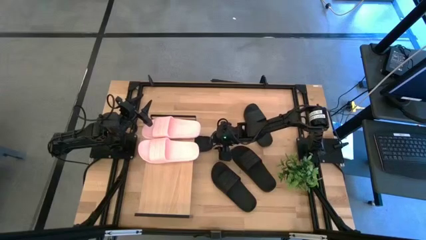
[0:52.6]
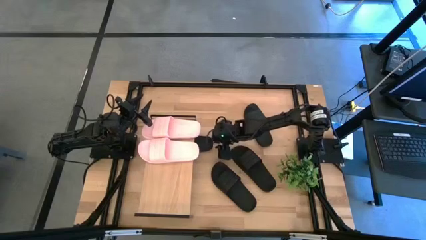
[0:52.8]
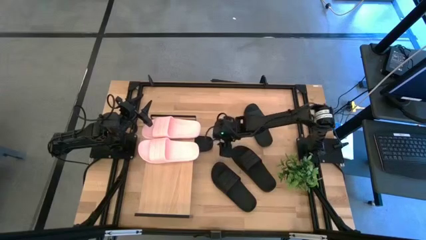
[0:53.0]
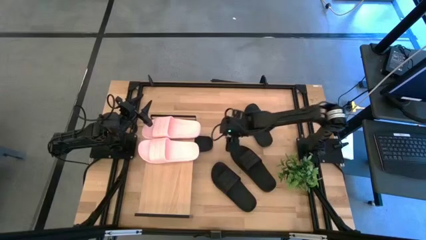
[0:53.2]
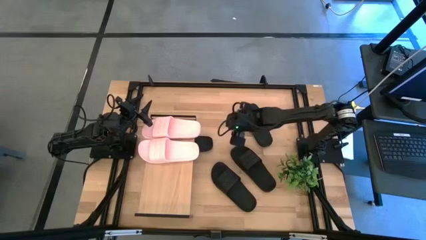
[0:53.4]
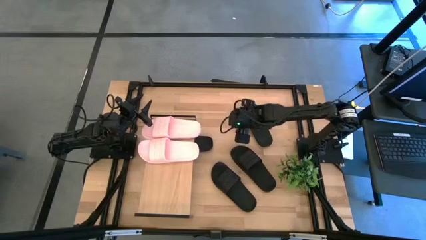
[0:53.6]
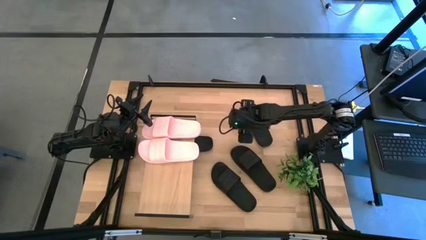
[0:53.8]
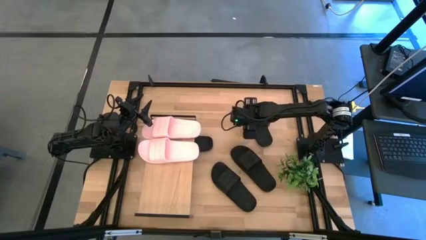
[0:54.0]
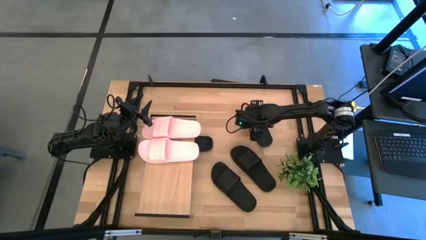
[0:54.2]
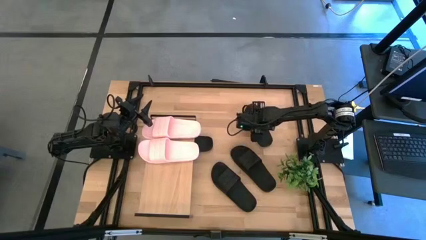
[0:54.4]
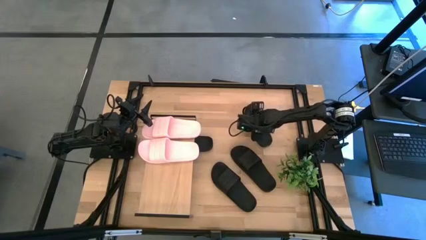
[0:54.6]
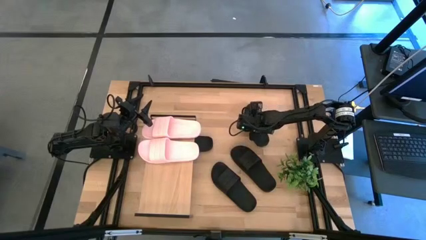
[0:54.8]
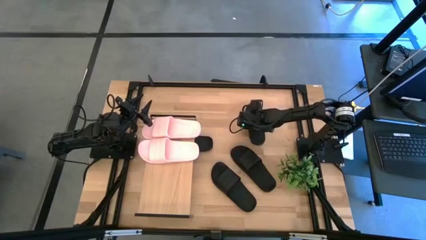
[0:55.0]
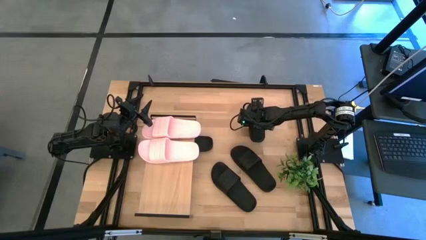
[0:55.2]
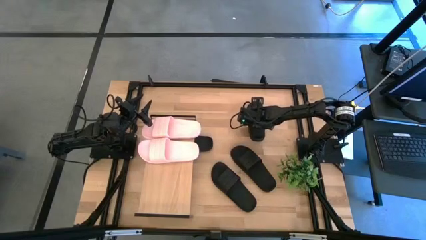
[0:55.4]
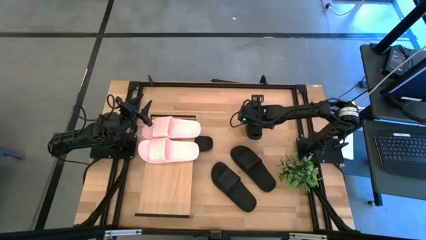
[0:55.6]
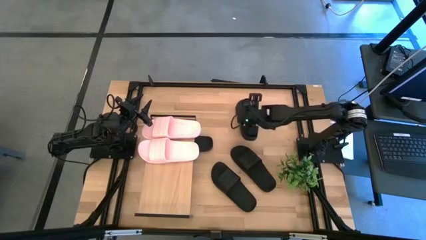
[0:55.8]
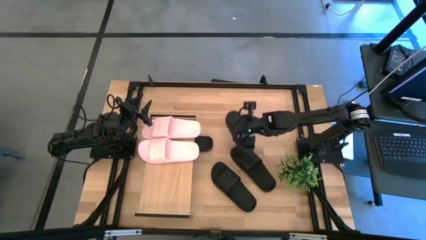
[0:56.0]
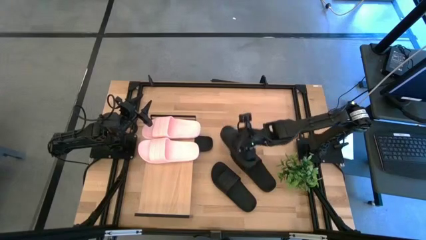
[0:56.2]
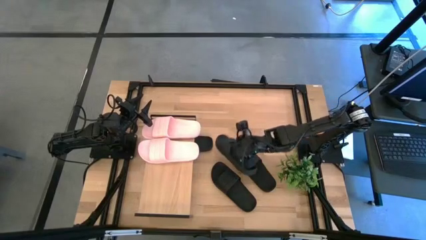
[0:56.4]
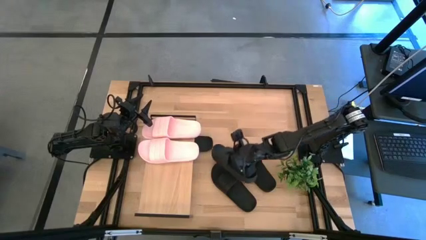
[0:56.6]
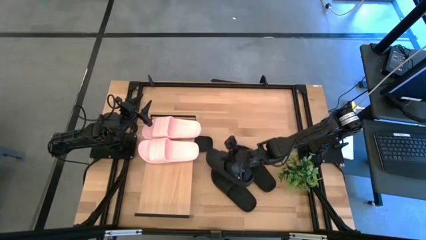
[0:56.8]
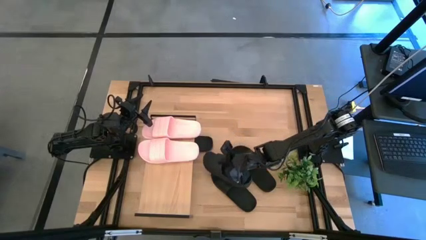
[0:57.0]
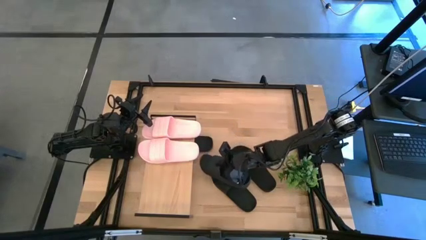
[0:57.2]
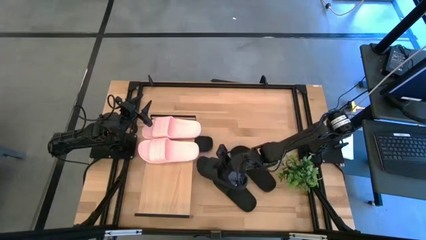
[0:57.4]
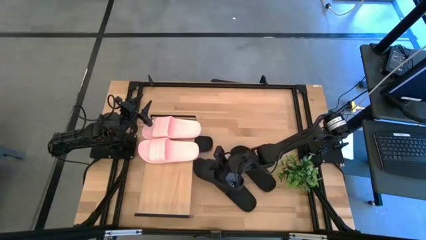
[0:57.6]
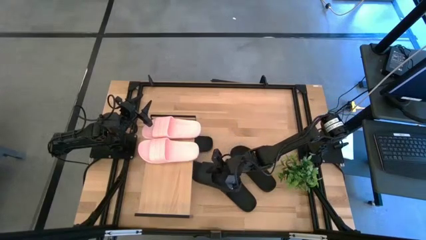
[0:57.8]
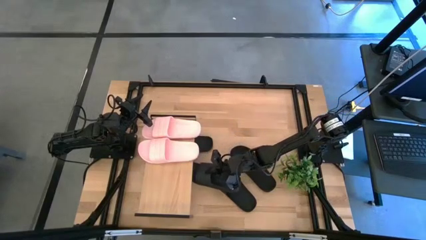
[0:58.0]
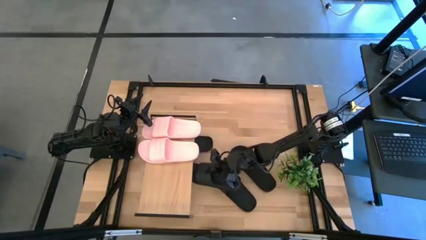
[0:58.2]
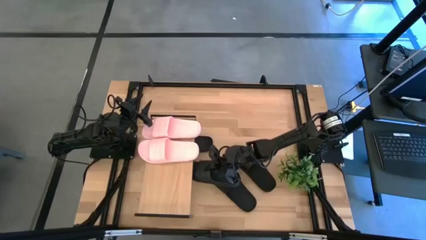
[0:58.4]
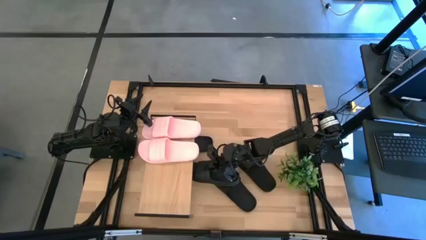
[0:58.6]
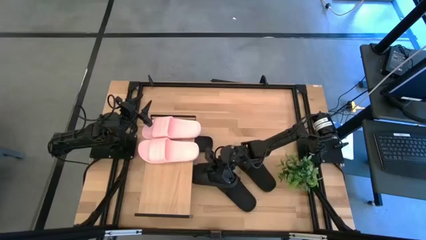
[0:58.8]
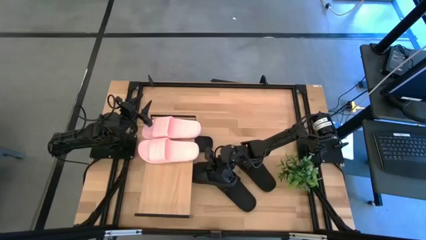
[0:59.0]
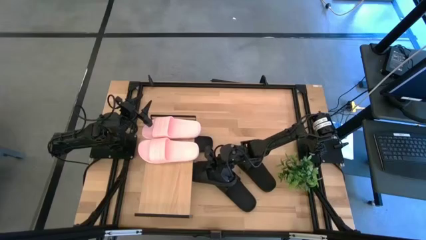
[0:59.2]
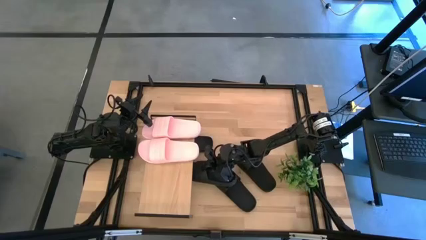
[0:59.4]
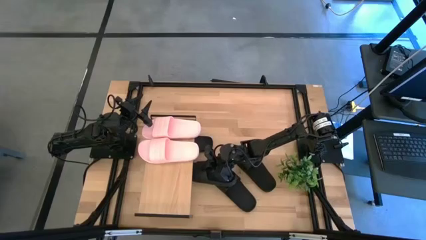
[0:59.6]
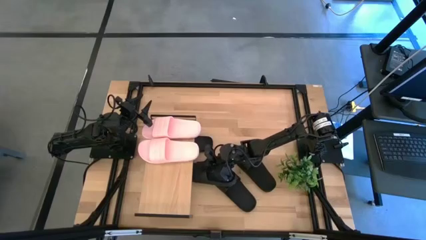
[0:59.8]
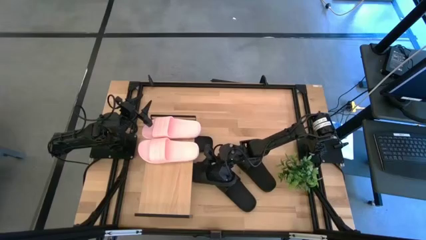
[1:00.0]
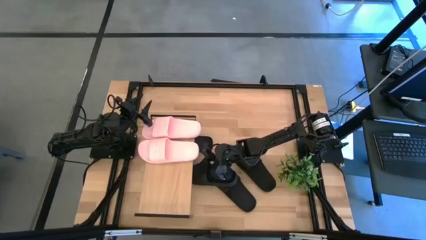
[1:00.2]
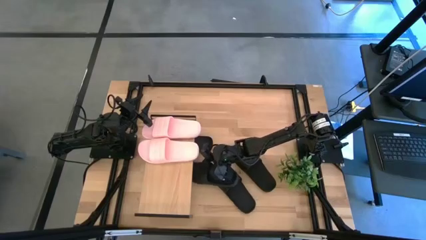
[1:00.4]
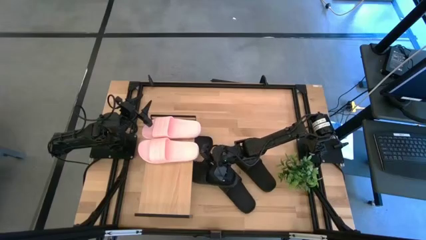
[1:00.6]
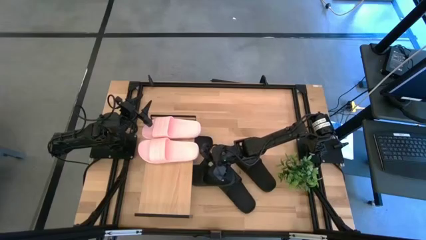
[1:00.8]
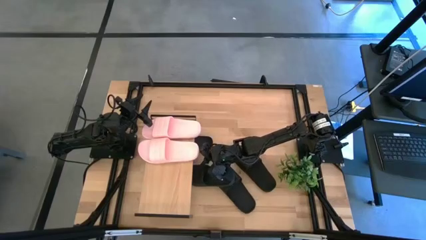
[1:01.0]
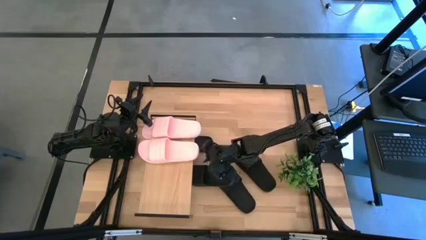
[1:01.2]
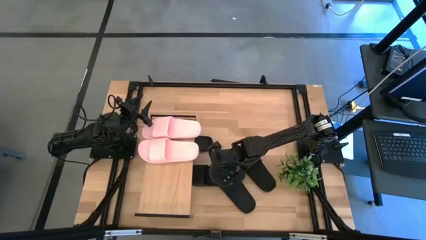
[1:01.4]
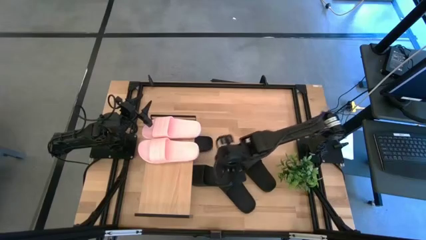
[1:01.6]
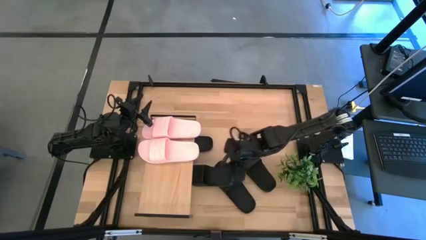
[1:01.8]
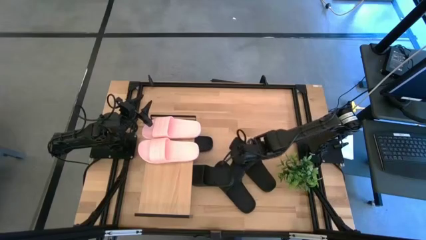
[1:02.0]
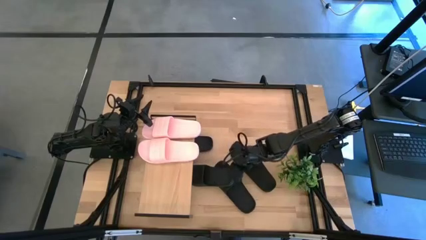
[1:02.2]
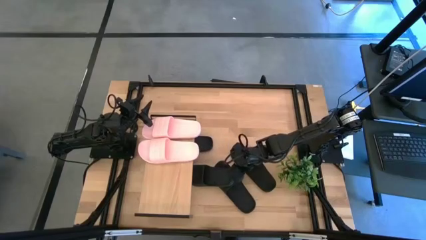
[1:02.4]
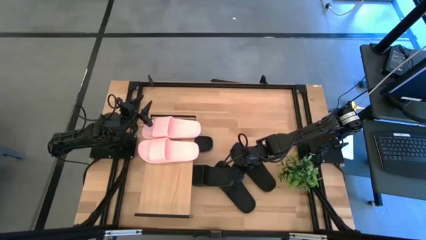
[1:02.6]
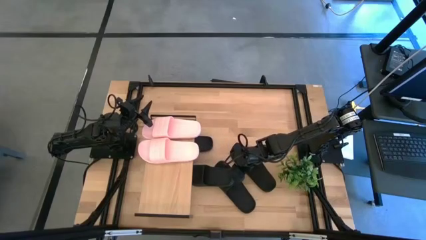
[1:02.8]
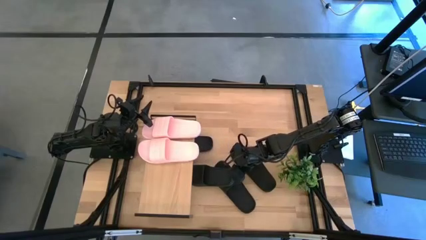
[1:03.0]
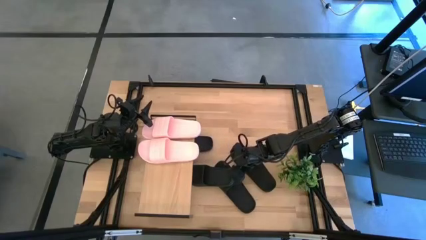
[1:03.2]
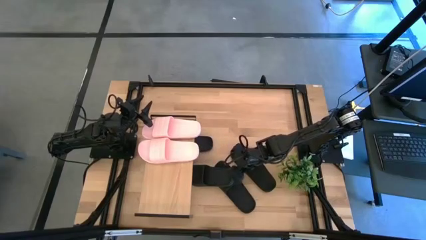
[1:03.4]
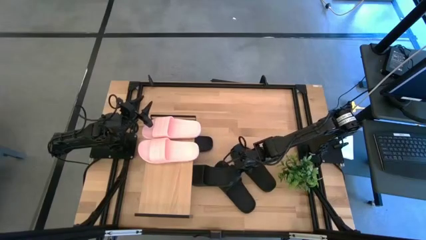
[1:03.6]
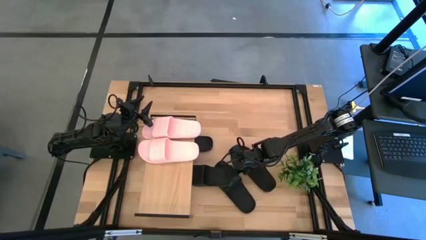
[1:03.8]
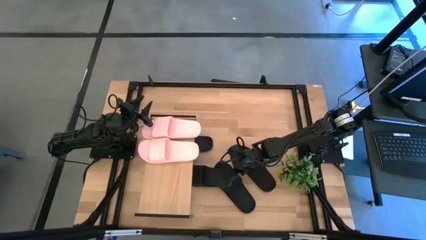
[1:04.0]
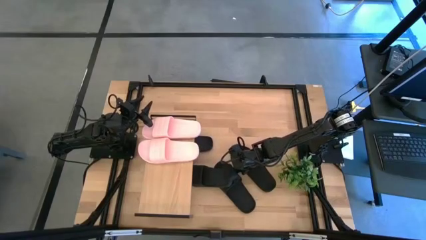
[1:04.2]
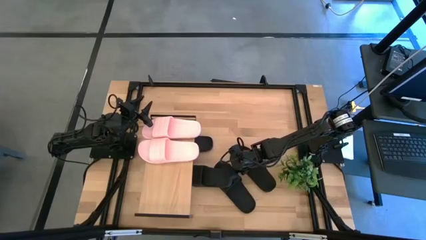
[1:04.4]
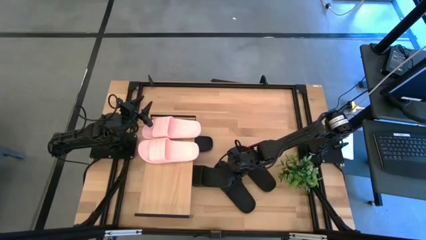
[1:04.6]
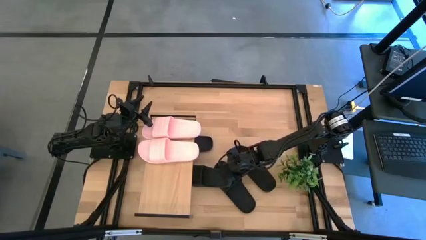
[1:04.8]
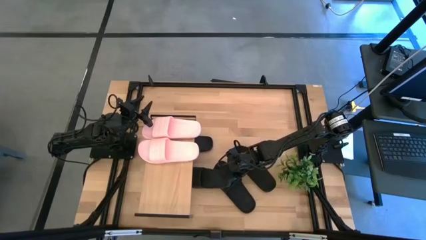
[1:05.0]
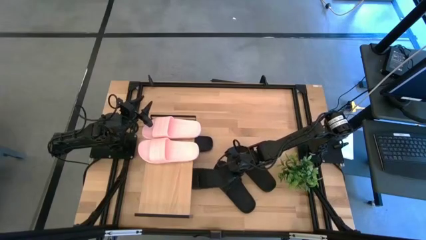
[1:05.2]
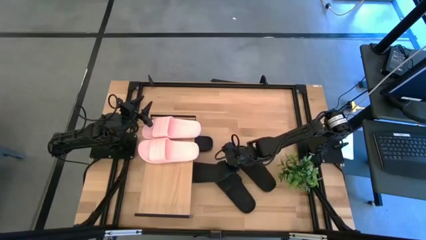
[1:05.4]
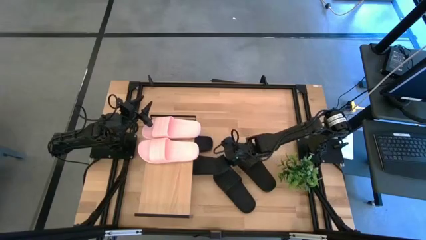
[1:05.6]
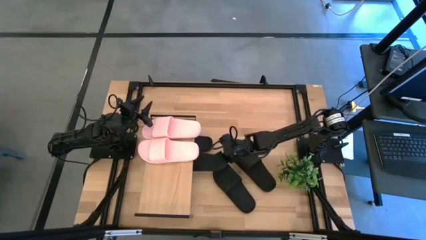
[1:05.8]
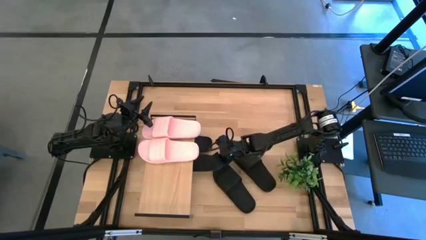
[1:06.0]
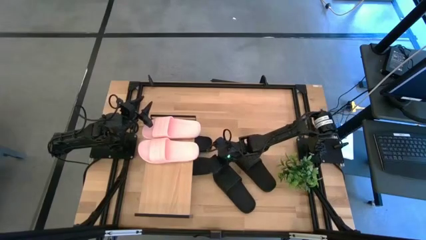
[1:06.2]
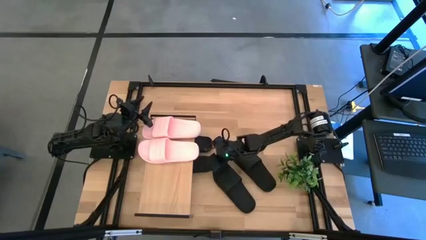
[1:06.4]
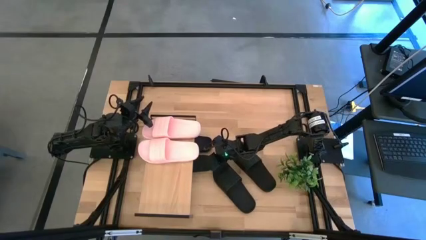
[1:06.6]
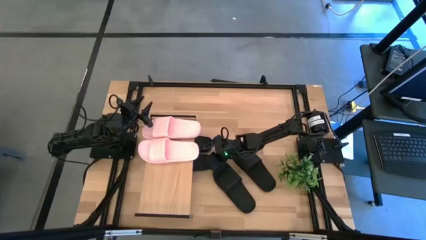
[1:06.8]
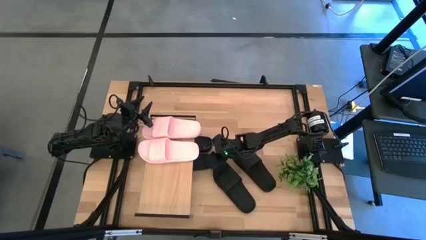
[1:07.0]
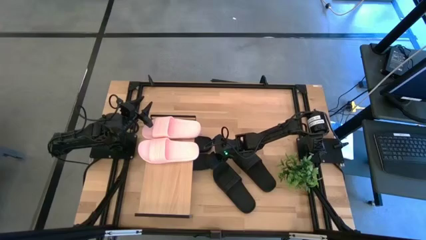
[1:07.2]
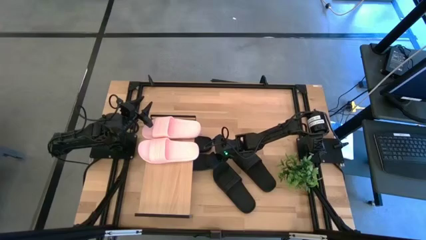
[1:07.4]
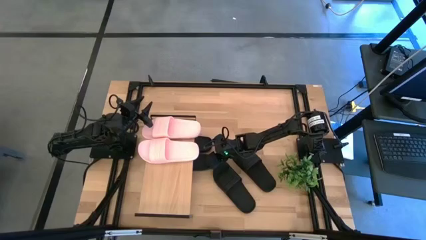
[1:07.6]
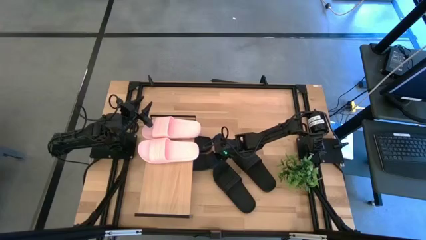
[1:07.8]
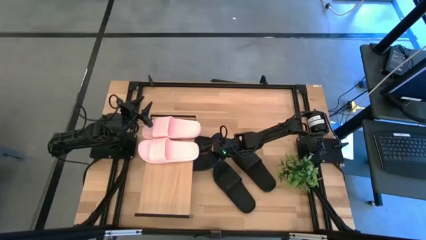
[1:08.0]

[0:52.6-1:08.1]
Task: Pick and place slides into the shelf
Put the black slipper under the shelf

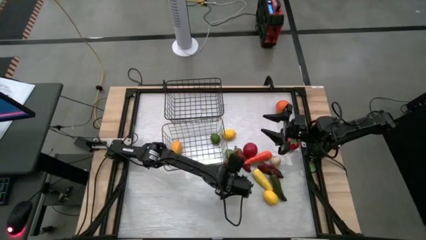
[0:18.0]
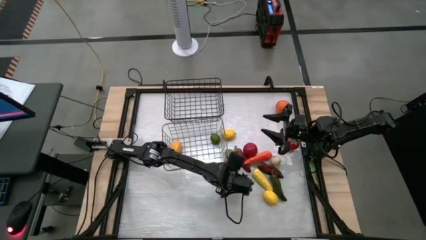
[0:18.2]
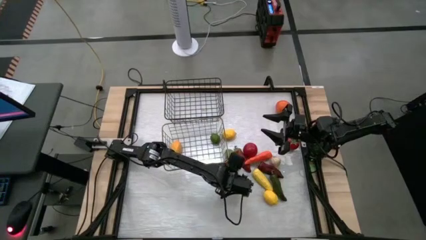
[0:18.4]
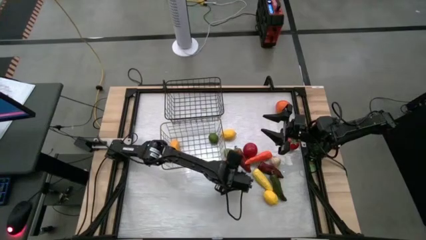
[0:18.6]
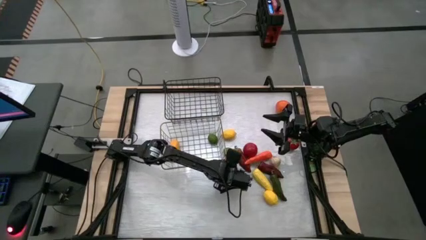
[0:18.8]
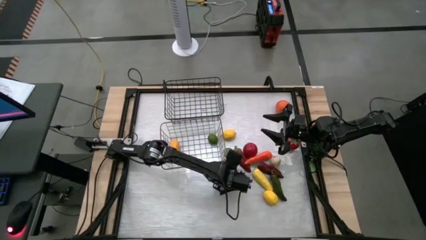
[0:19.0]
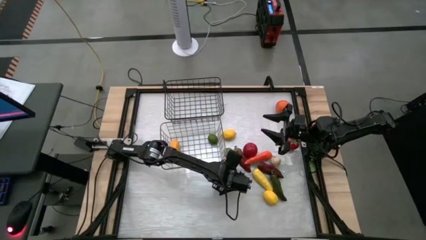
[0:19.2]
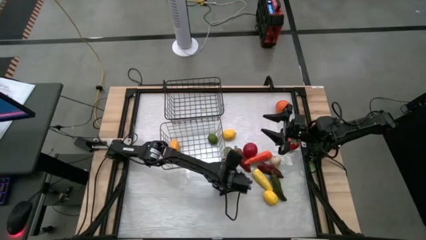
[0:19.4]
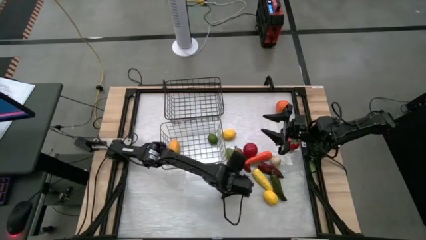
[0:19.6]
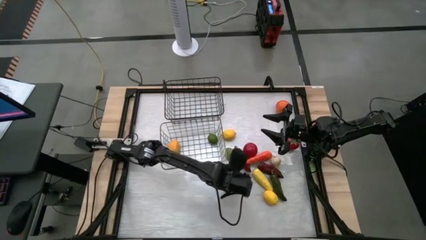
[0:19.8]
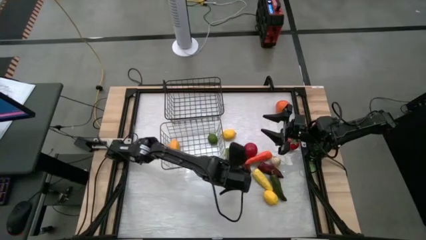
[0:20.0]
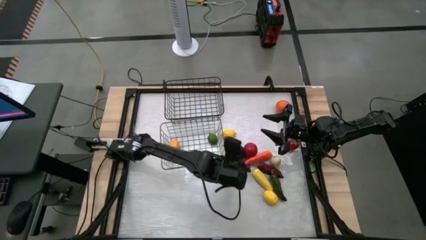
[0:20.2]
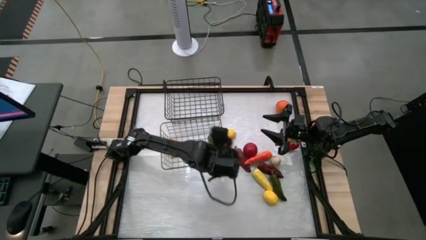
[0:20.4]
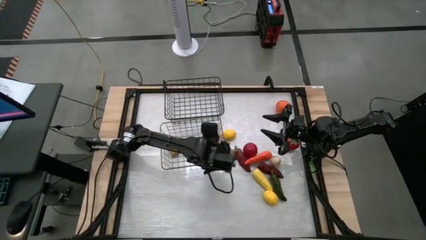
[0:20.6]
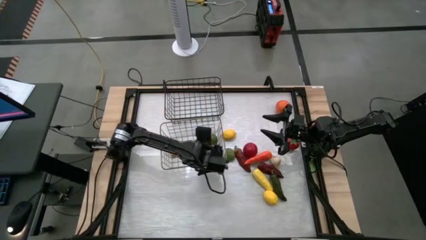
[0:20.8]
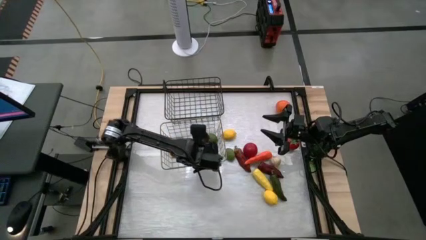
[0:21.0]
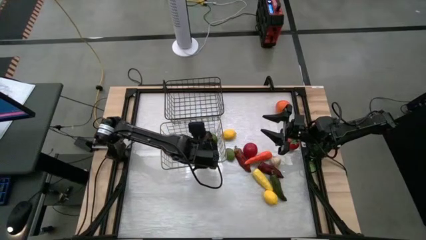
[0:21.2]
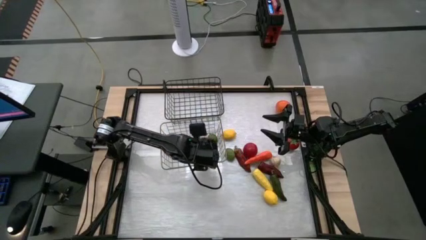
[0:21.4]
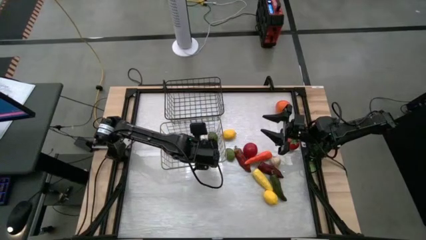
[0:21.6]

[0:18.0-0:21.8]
Task: Sort produce into baskets
Put the red apple into the brown wire basket
